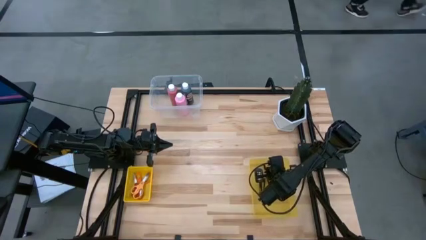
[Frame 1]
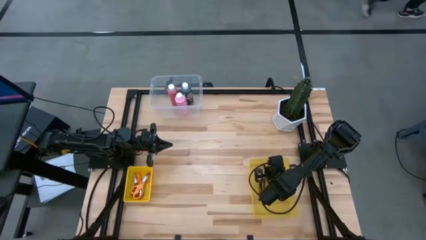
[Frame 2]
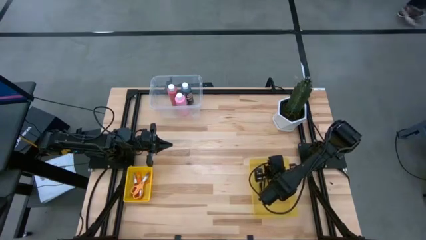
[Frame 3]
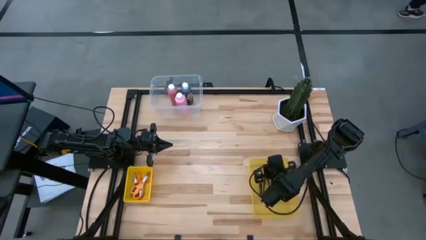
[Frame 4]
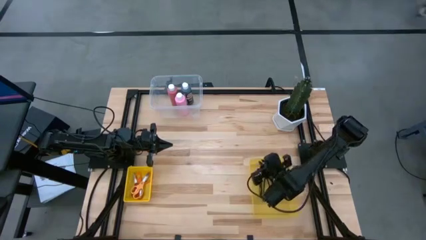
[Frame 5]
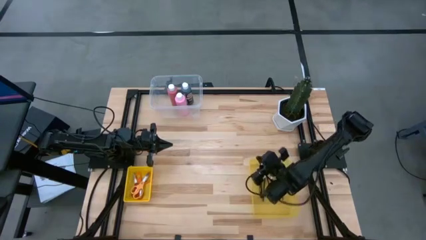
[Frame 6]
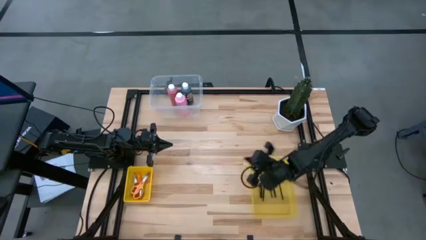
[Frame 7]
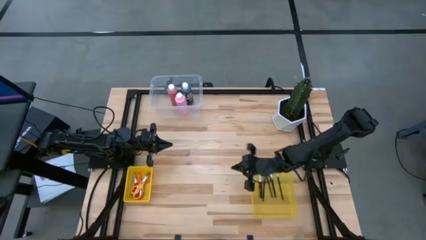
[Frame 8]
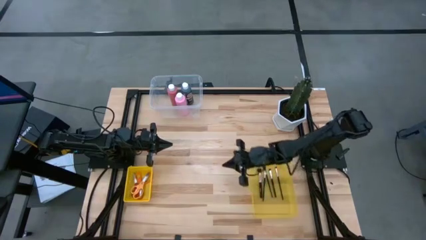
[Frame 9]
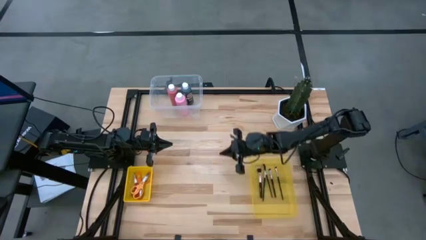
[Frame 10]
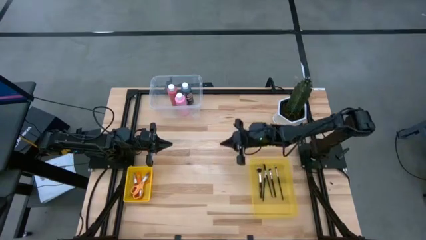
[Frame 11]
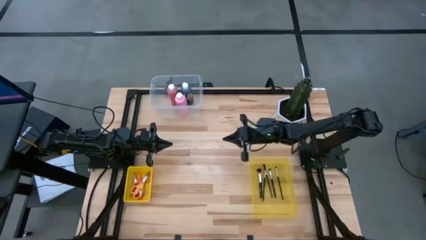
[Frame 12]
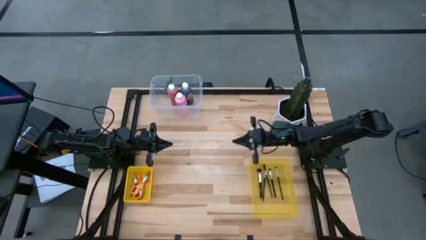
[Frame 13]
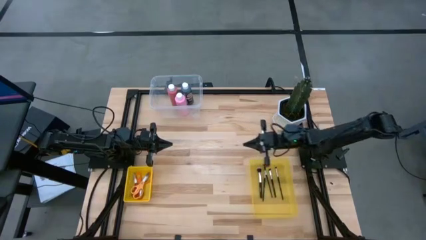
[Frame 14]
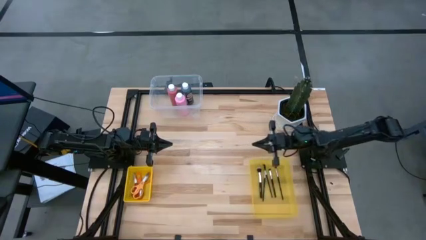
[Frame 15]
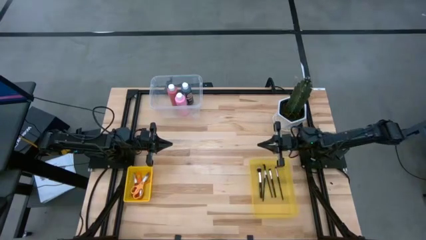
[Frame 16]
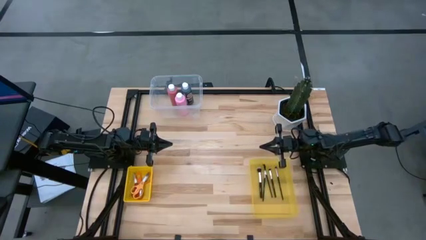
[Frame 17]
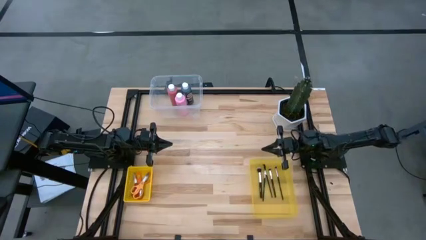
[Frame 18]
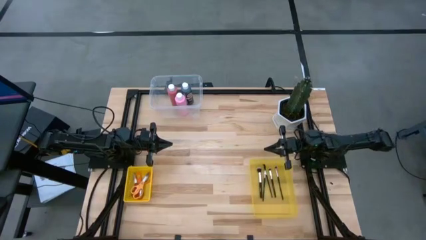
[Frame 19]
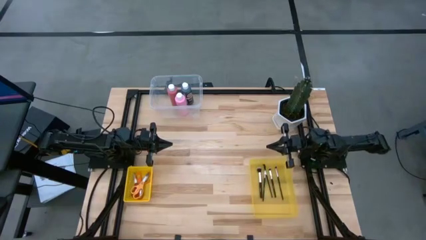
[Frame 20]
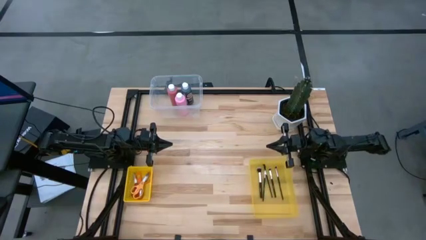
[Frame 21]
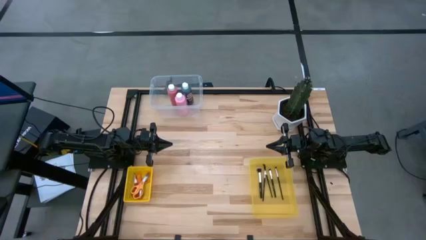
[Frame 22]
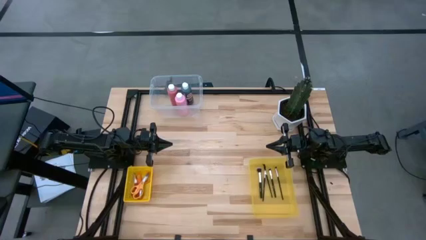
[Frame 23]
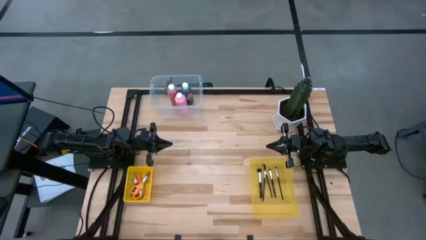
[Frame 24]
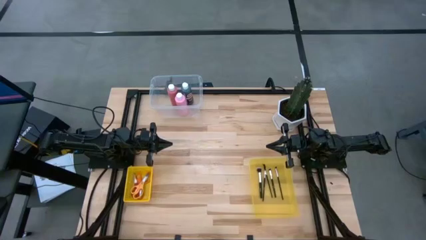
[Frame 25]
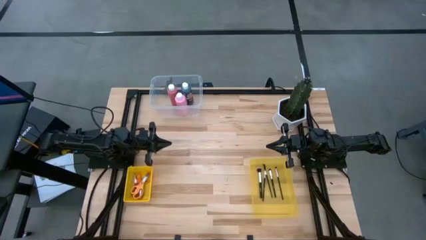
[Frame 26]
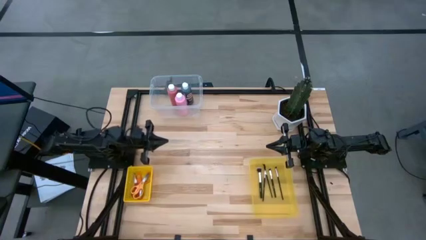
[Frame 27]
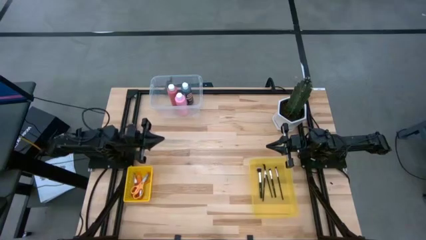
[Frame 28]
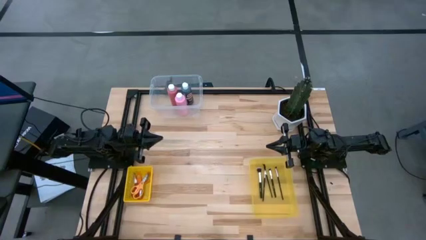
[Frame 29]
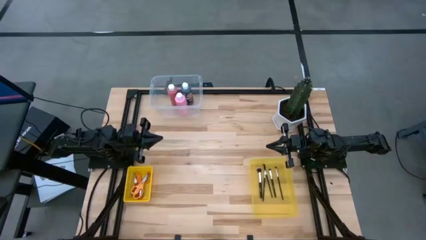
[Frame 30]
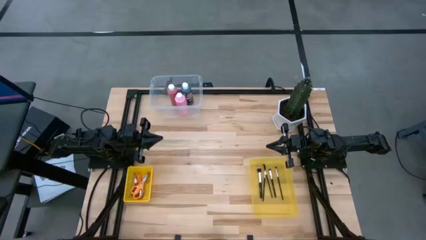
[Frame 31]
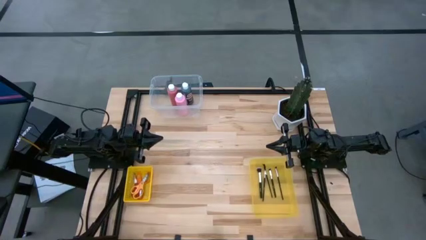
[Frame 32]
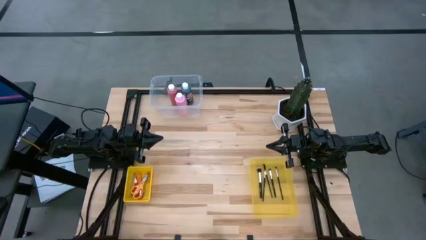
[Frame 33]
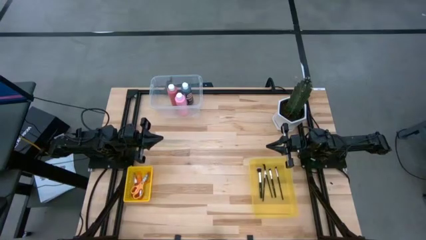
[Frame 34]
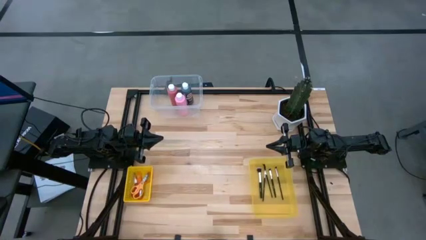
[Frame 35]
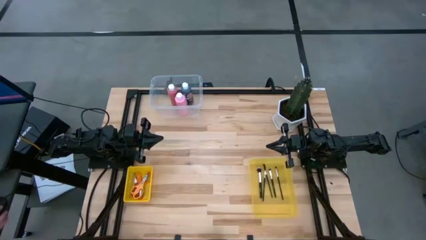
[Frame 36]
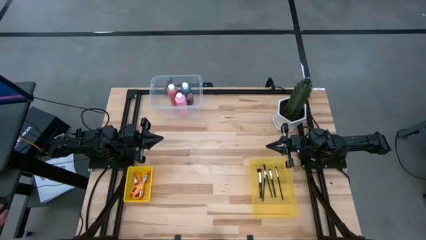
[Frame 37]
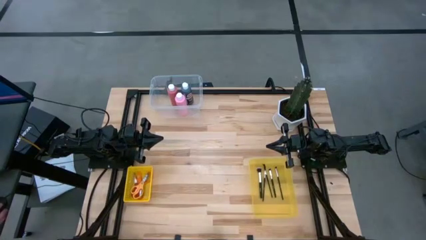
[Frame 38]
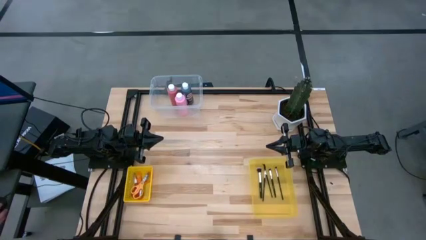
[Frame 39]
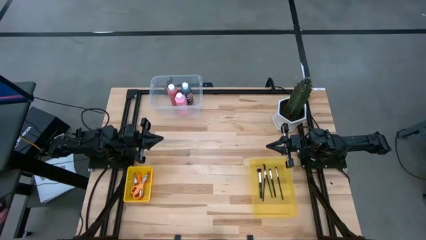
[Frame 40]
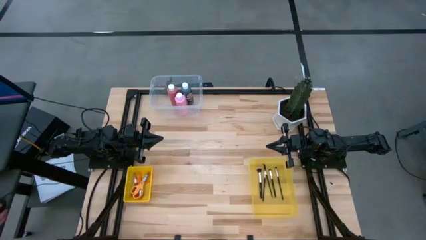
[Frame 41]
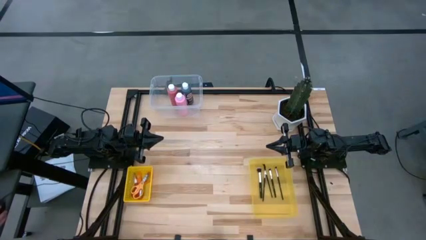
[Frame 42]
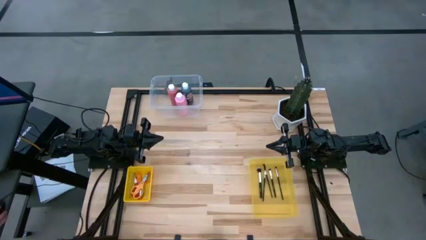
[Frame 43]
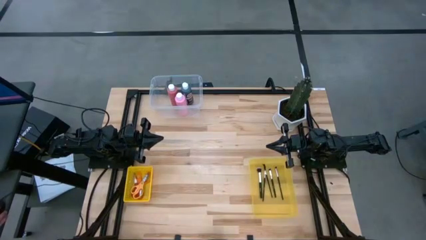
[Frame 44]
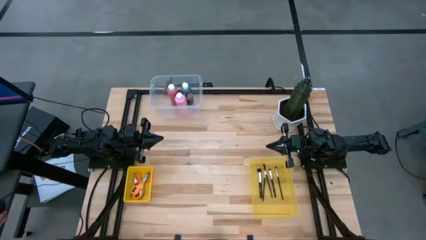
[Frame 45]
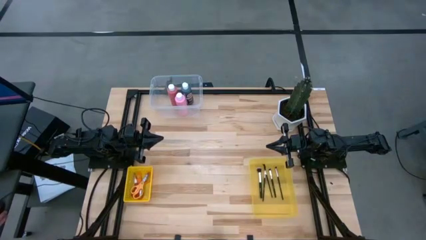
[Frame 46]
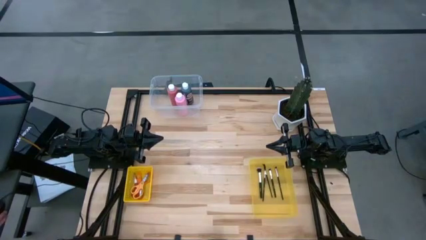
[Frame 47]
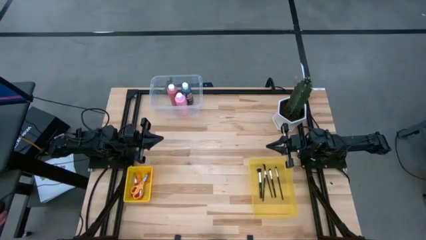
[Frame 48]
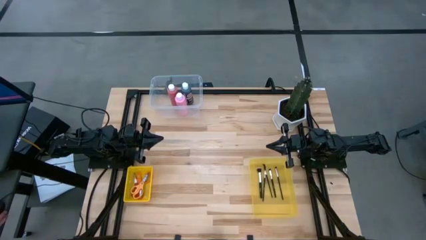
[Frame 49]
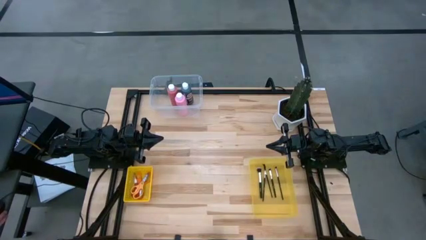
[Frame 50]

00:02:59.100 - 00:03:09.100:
Task: Pick & Place Paint Supplies
Return to Home Position

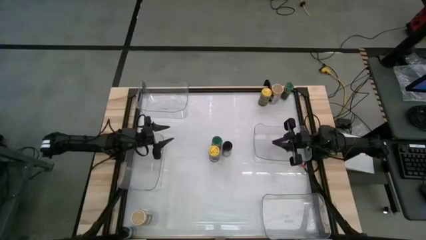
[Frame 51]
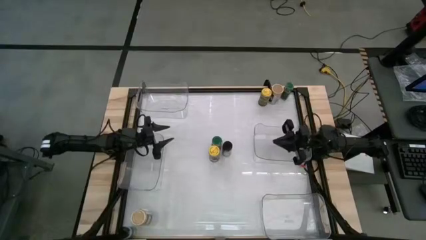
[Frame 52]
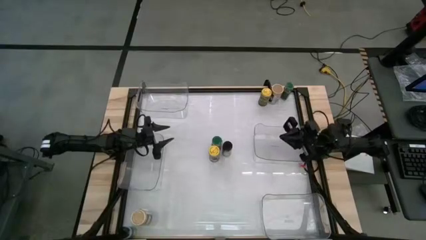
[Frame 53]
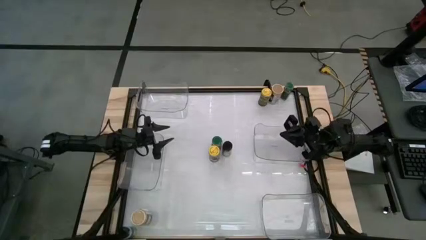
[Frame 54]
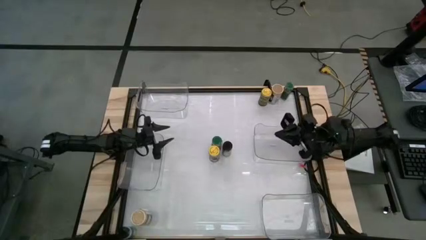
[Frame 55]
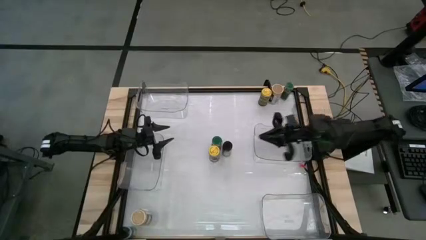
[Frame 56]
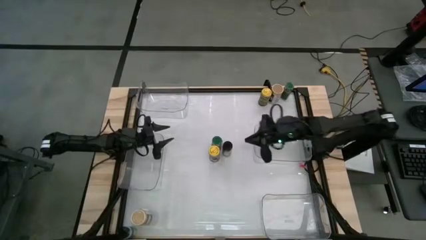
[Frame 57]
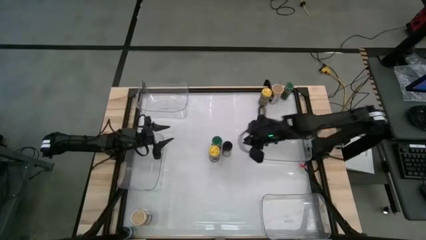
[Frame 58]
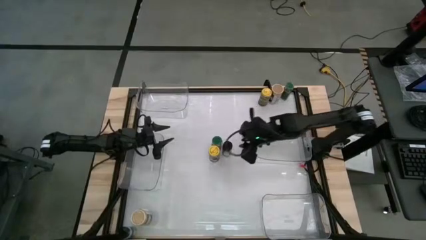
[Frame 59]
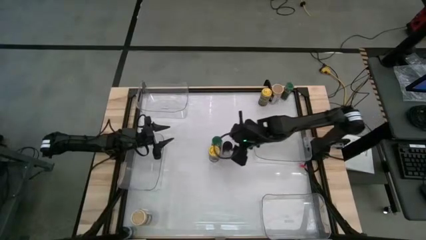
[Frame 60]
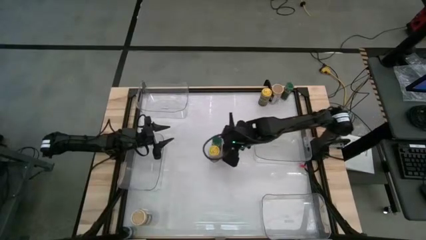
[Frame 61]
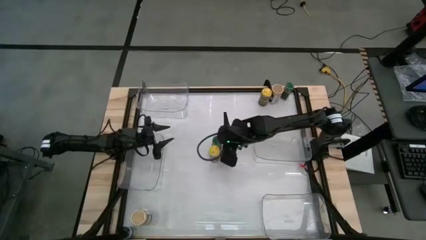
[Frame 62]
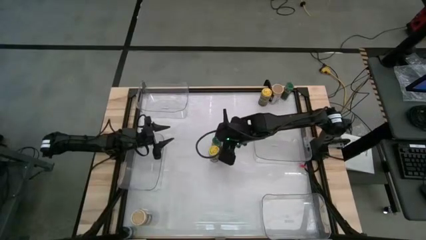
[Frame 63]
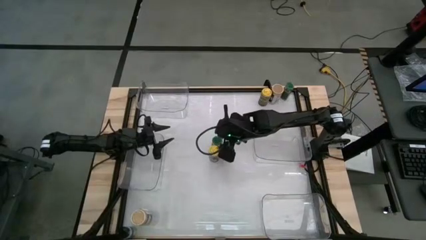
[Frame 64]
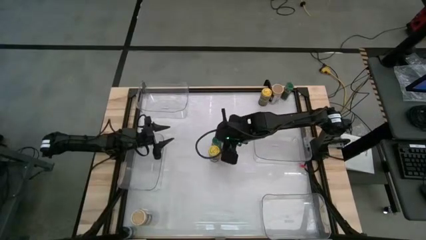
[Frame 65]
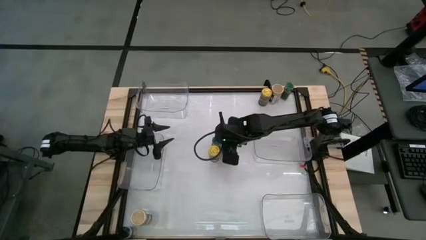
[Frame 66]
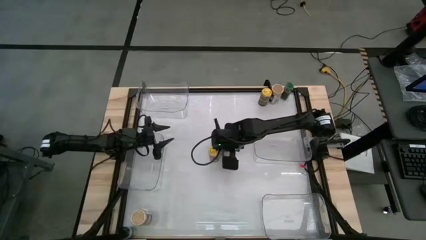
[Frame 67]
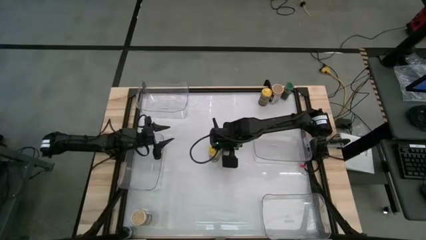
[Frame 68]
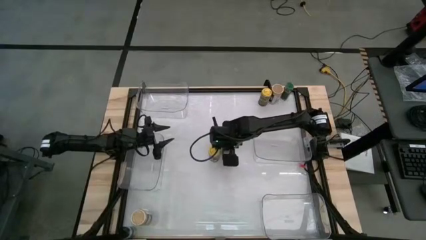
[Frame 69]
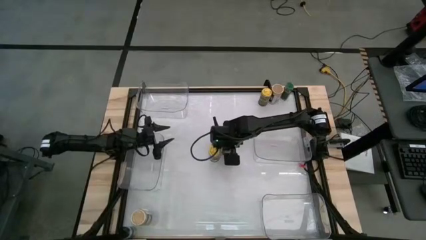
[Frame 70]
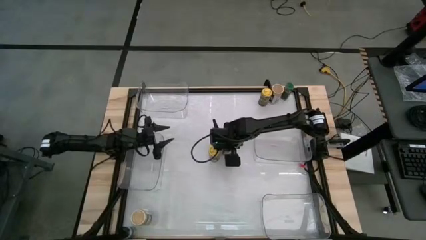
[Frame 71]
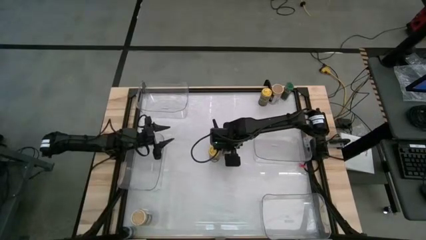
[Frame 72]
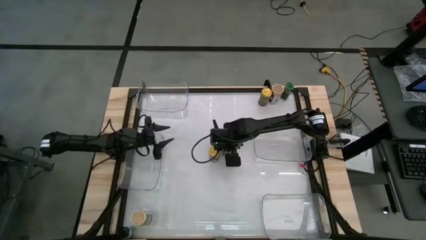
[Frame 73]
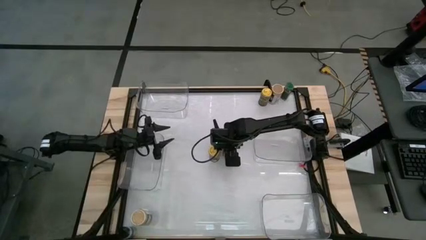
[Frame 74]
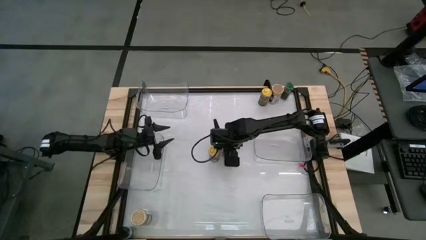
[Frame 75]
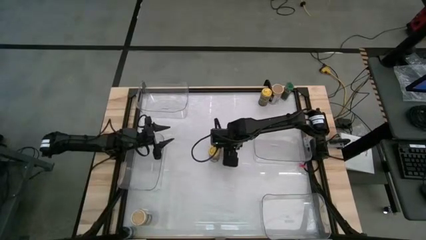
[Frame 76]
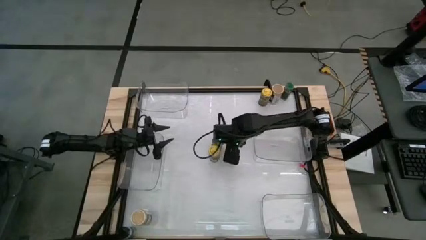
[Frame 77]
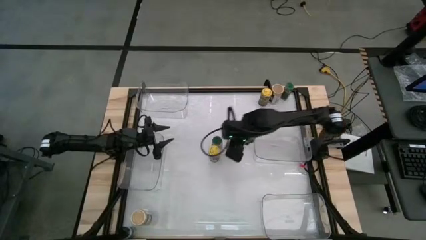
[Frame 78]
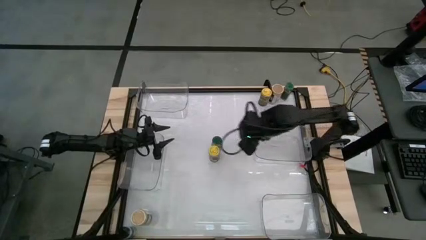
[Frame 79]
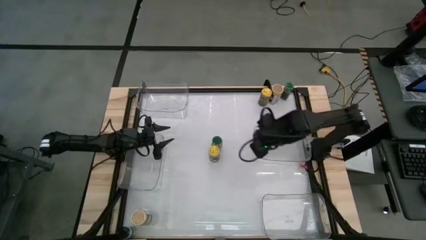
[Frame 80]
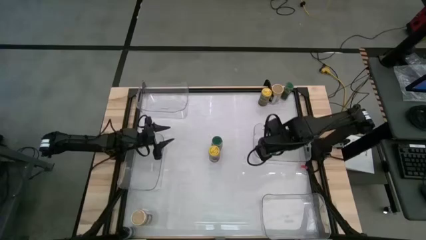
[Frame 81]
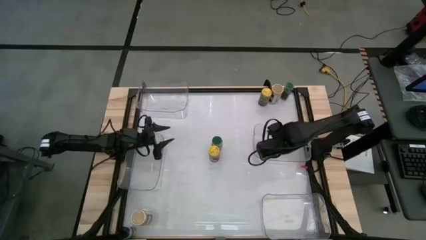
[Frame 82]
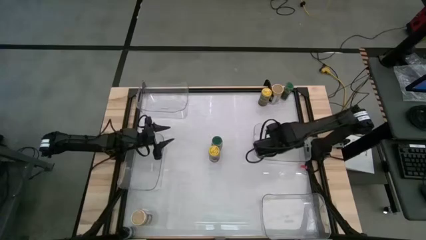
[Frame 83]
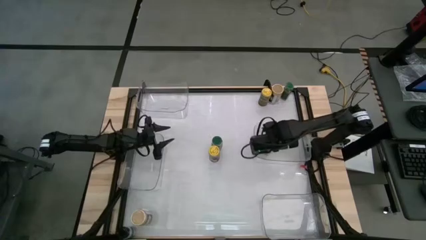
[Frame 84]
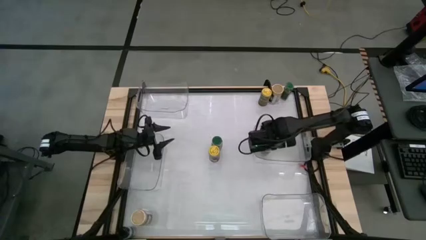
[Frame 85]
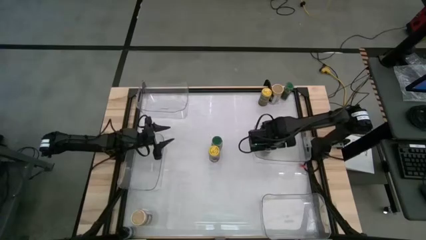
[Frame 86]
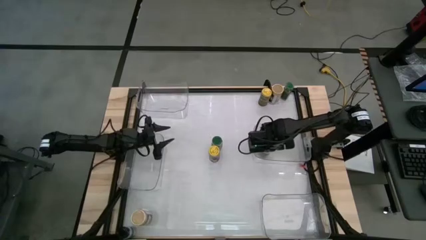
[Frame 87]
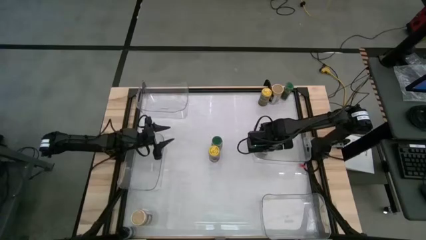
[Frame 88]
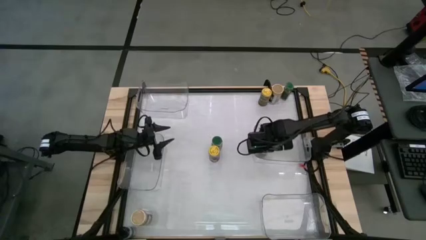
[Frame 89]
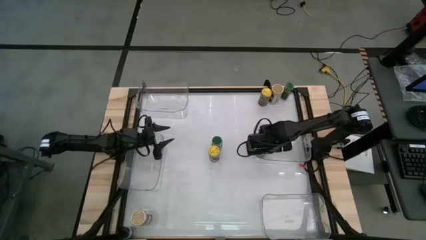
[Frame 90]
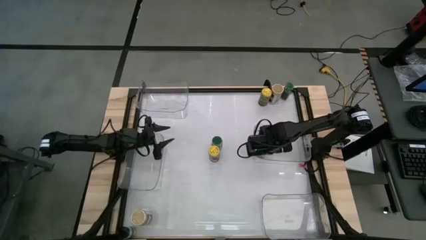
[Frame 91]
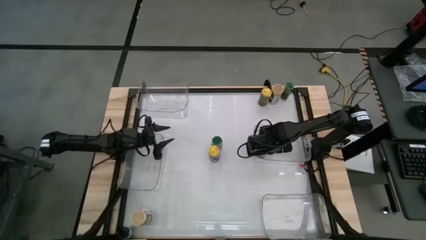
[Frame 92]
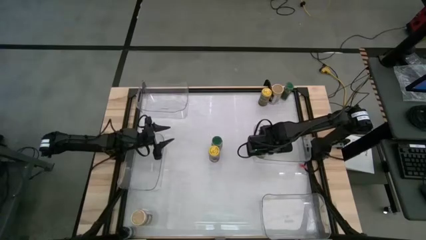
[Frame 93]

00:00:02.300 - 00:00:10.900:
Task: Sort spices by type
Put the top black seasoning bottle into the middle right transparent bin
